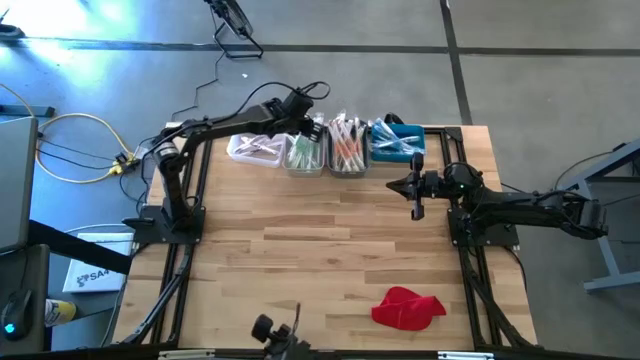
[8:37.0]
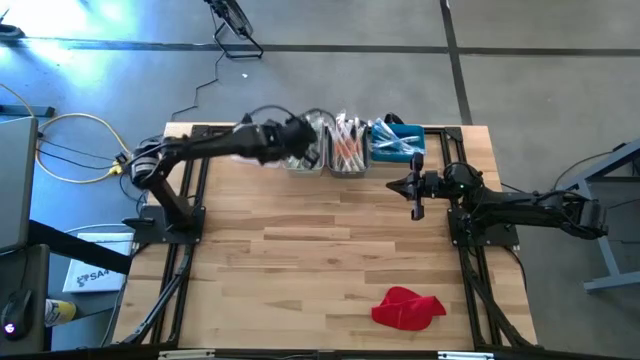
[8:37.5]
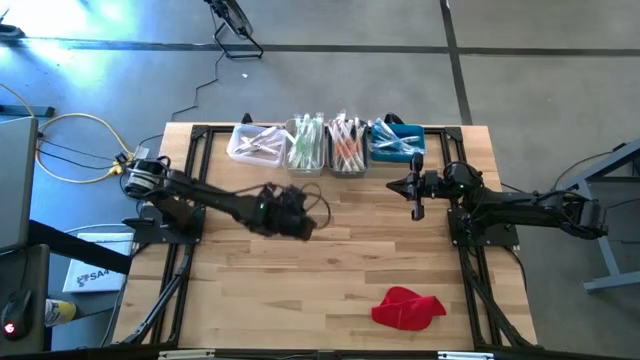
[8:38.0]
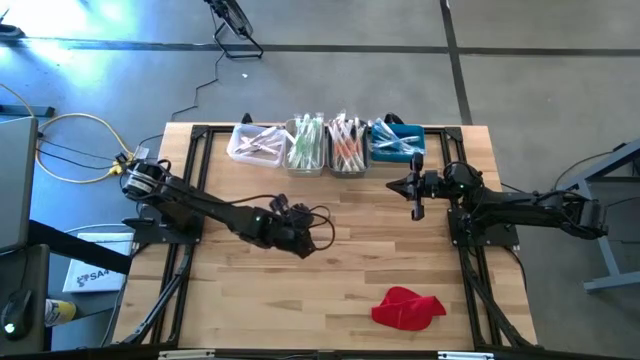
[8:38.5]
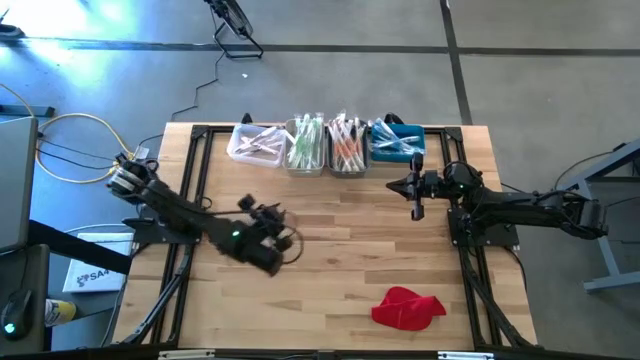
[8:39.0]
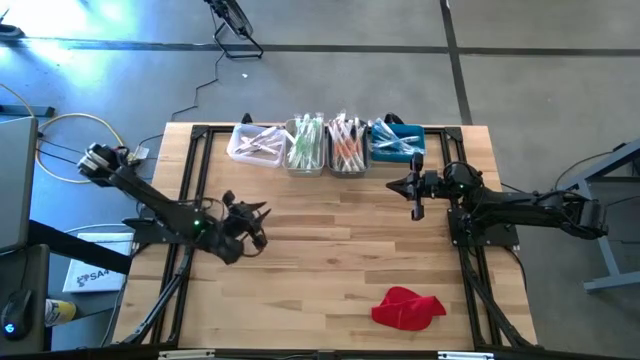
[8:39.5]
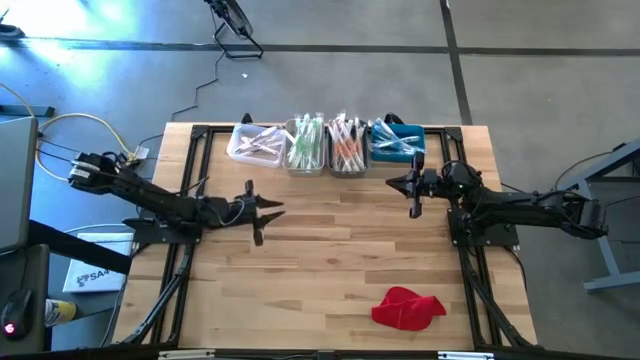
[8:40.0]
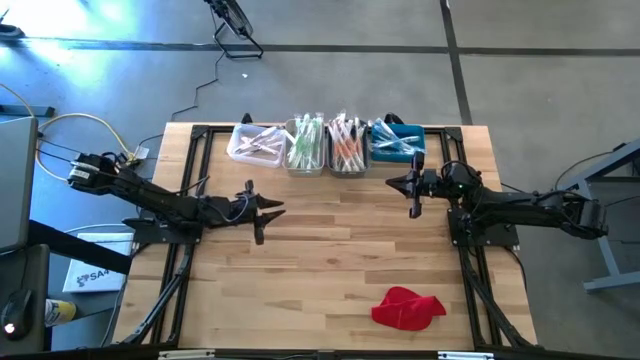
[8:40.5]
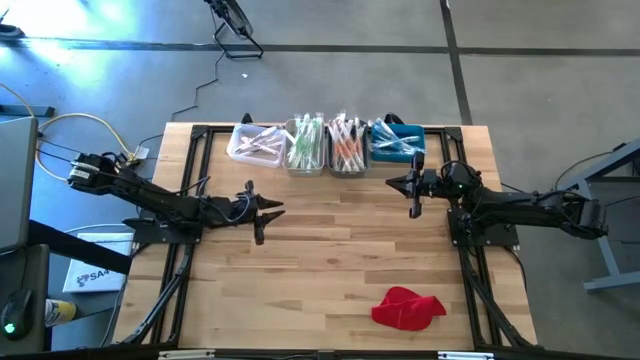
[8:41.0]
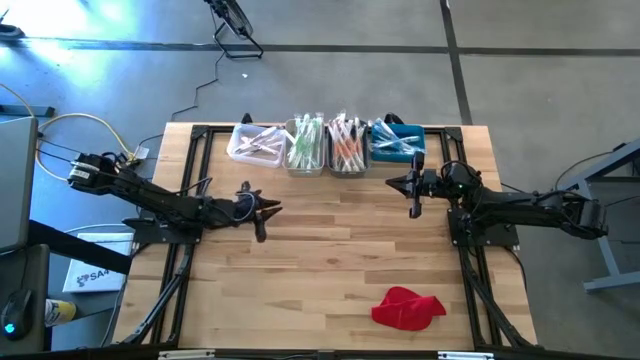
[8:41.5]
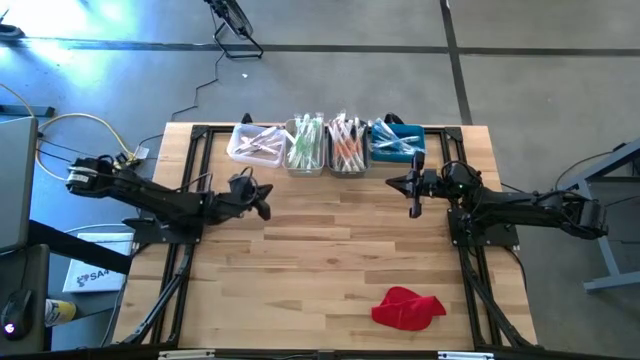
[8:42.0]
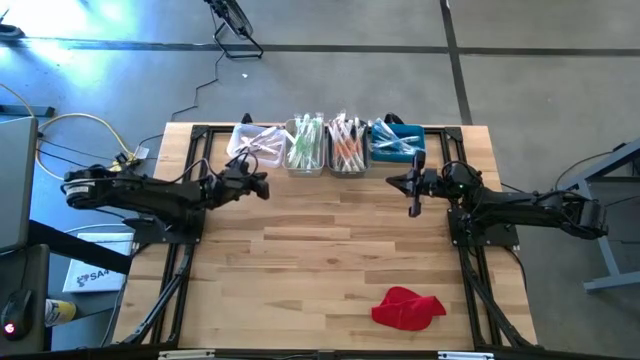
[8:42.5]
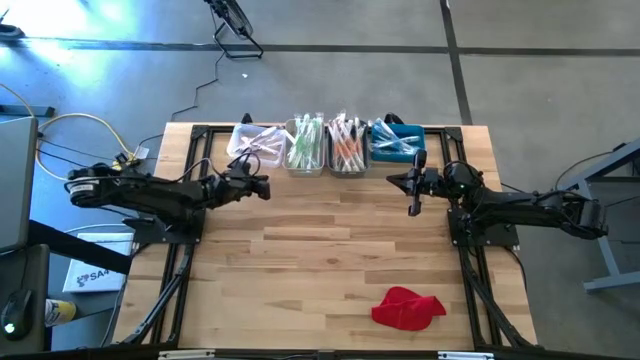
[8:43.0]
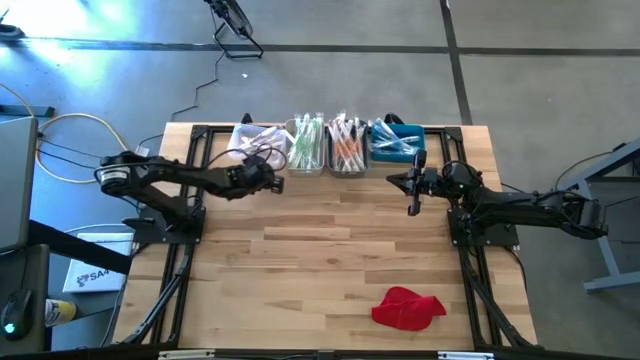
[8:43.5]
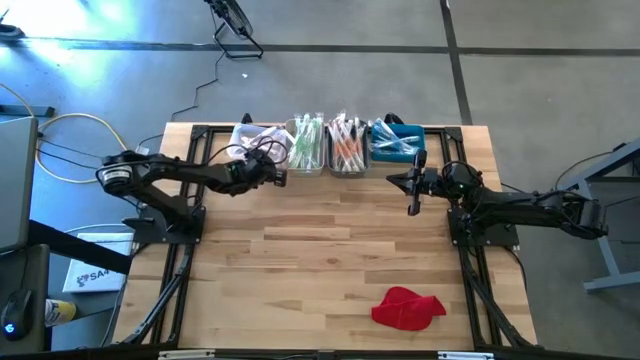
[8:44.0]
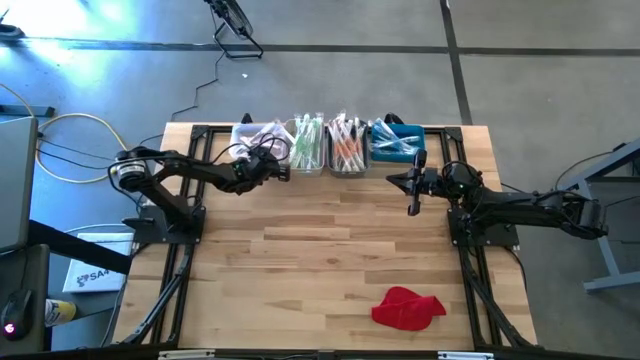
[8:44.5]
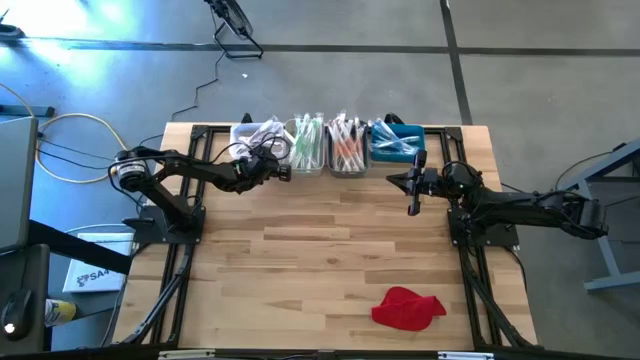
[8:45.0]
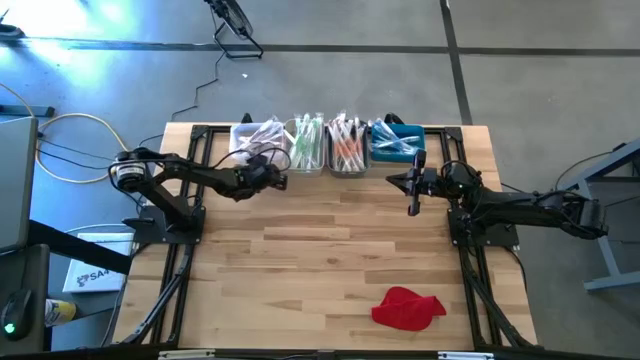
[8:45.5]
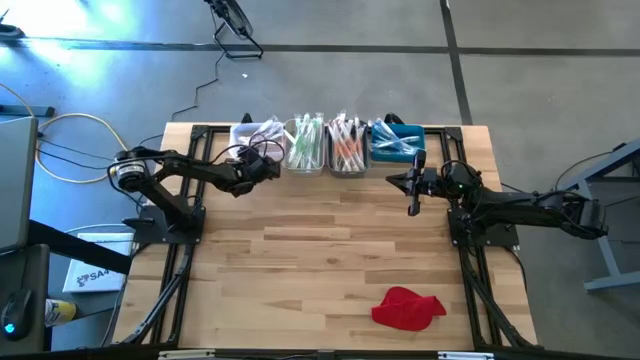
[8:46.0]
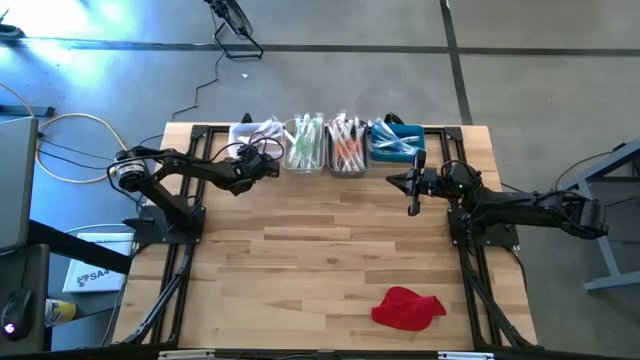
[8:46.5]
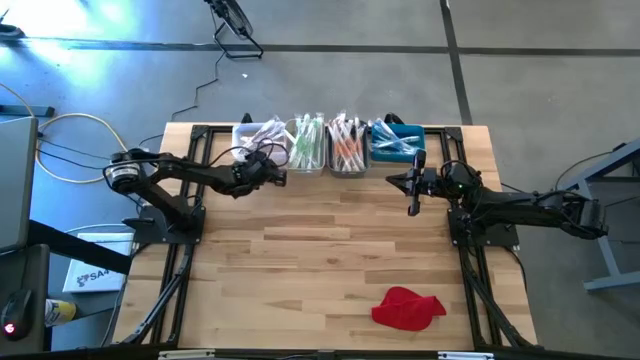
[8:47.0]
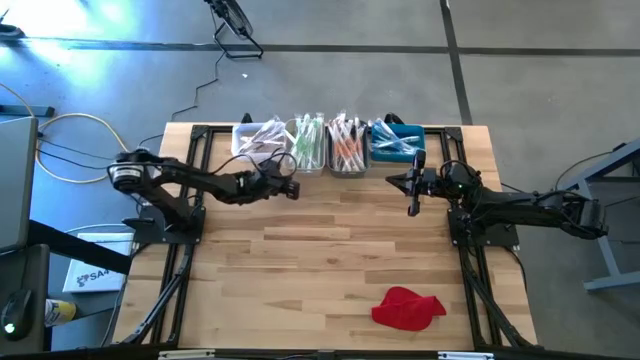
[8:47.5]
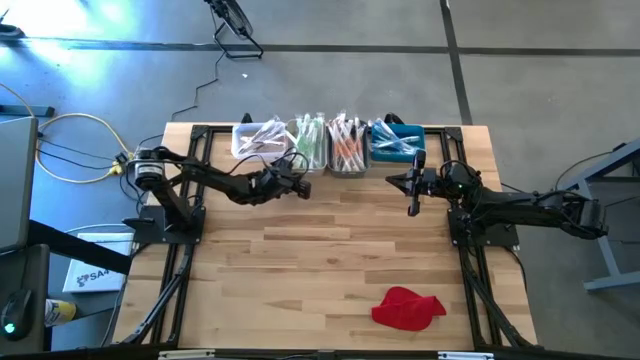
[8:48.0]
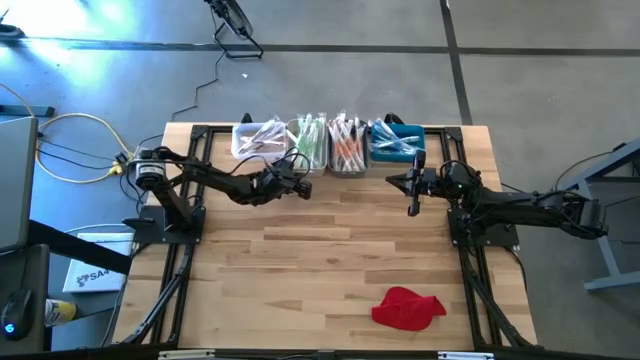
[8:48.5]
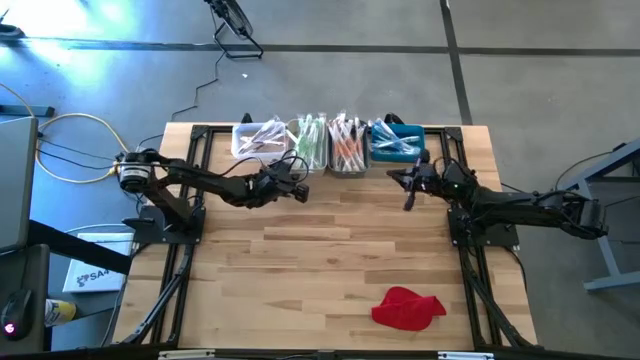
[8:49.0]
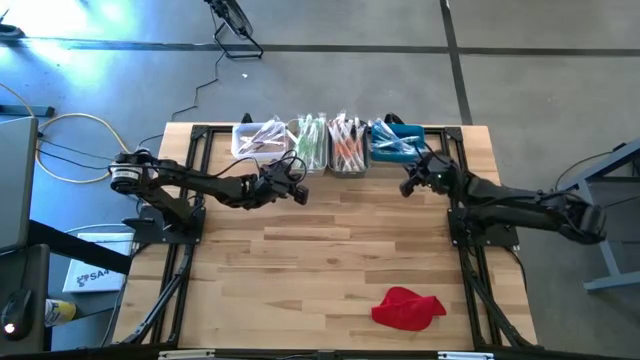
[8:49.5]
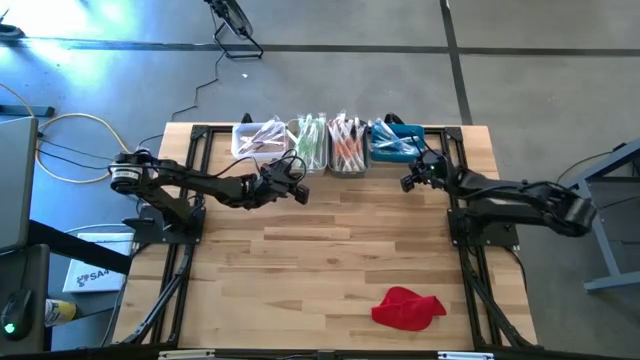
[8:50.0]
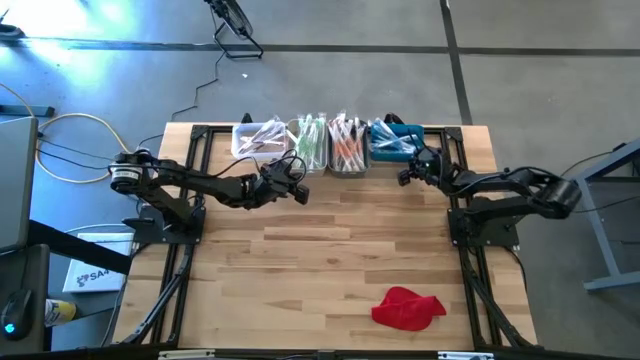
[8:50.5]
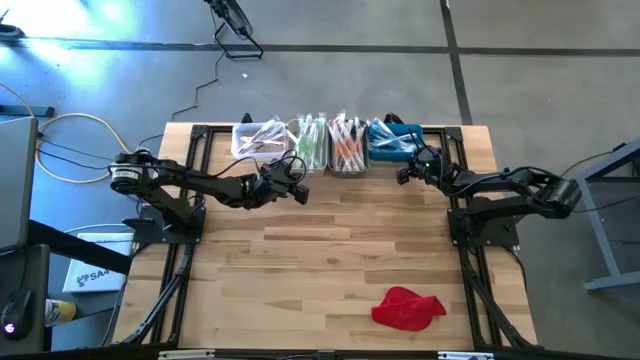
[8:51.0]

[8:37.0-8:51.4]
Task: Pick & Place Toothbrushes
Adjust the bins on the table

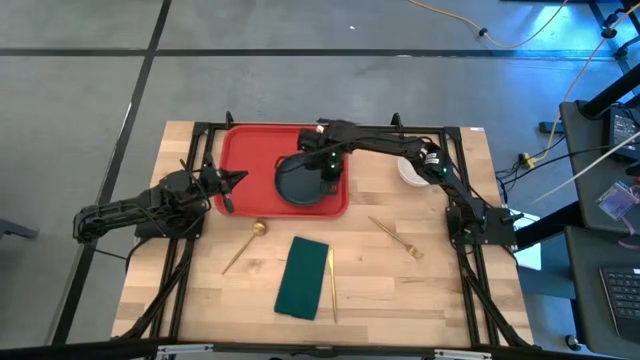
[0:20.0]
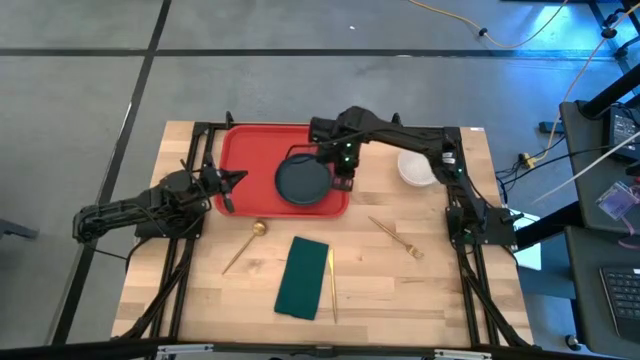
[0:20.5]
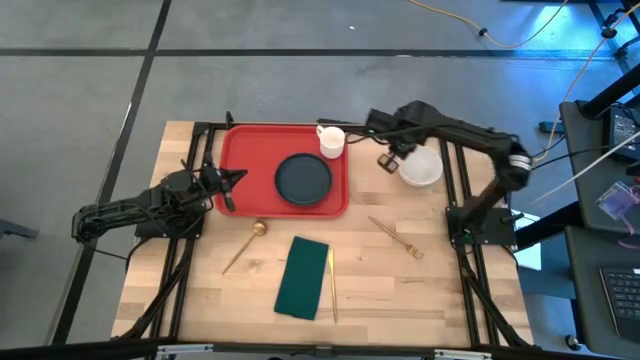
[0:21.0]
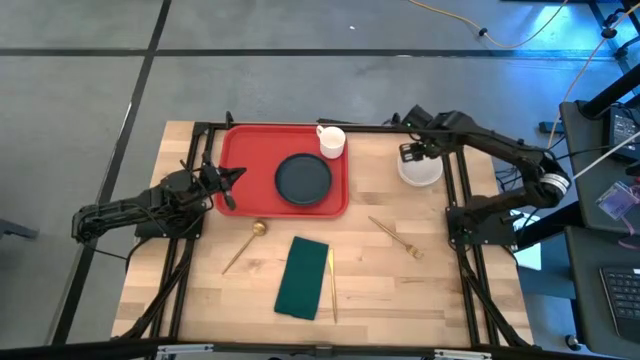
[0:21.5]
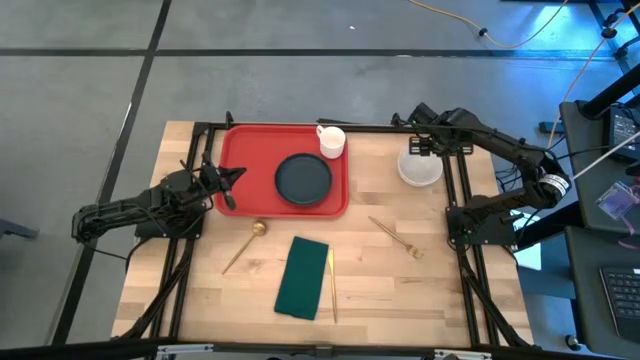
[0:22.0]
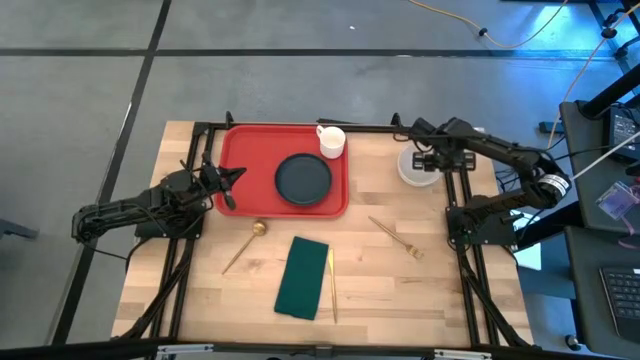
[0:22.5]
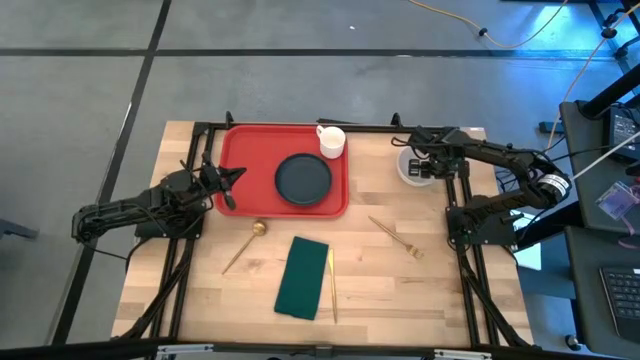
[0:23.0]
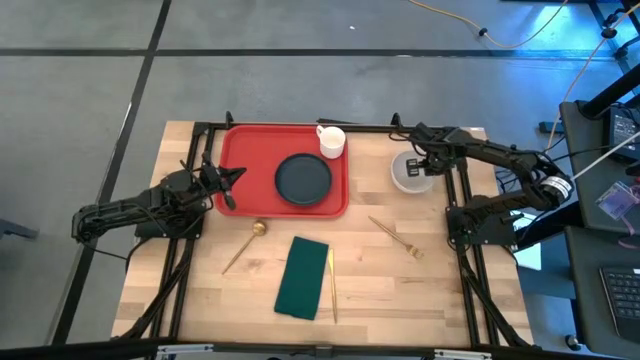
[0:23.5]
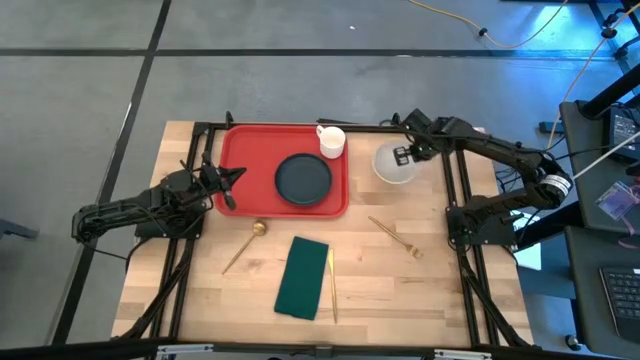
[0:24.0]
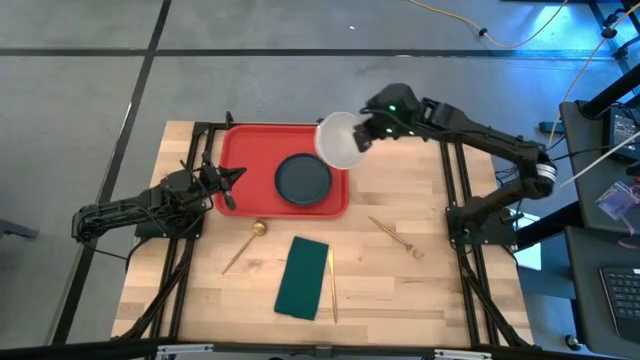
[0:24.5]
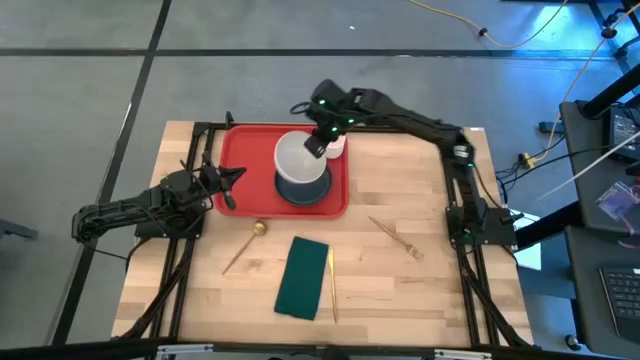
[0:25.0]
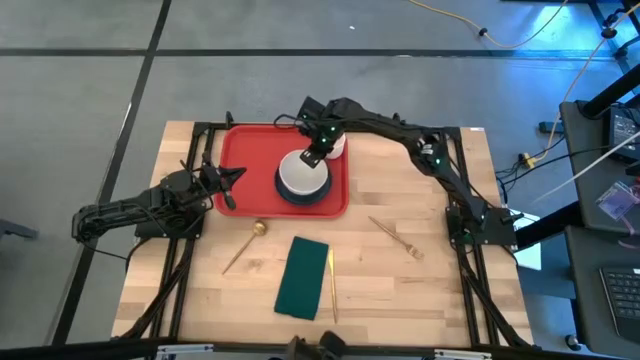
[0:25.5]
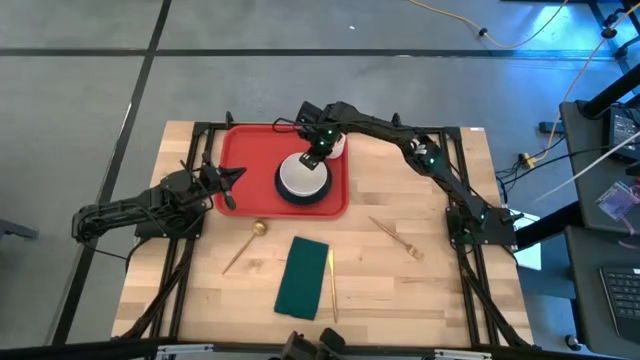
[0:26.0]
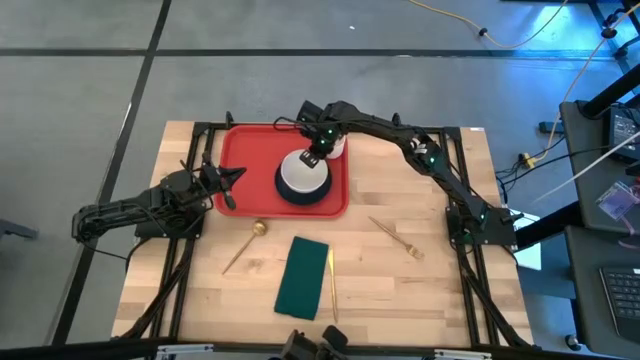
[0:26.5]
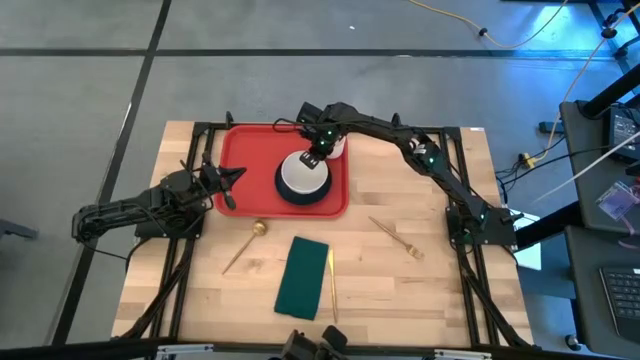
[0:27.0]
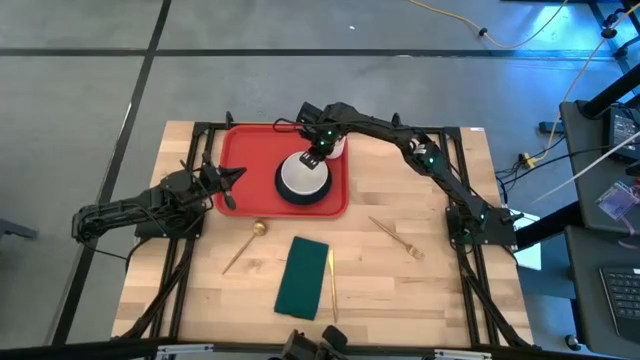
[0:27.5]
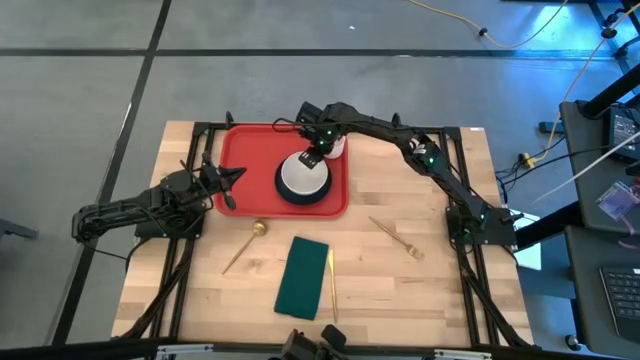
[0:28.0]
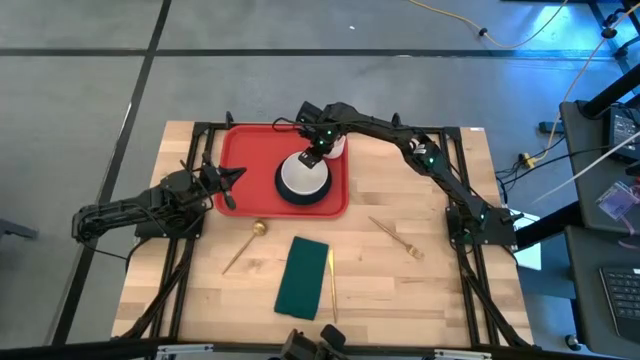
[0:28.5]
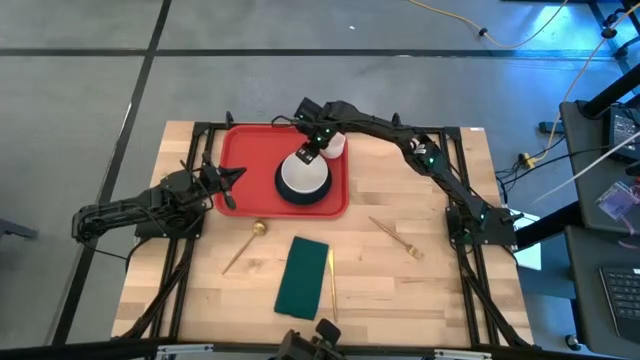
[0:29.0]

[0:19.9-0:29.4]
Task: Set up tray
Put the white bowl on the blue plate
